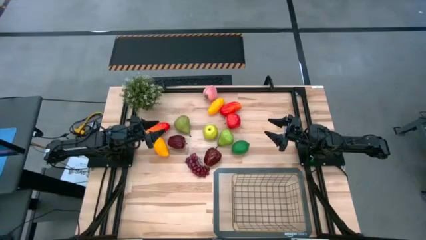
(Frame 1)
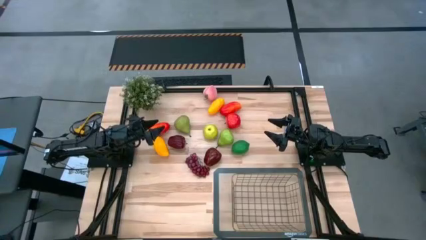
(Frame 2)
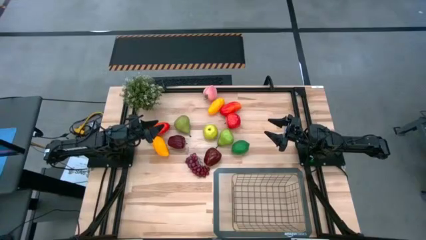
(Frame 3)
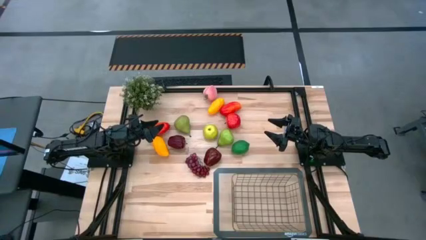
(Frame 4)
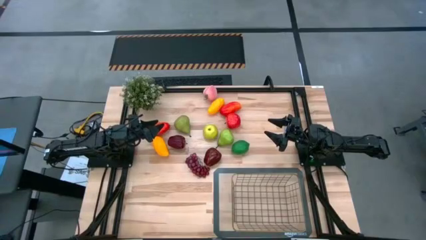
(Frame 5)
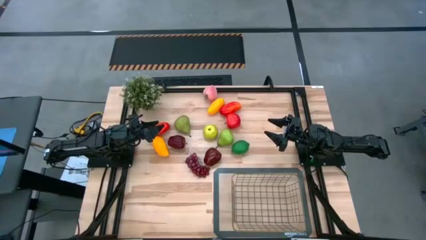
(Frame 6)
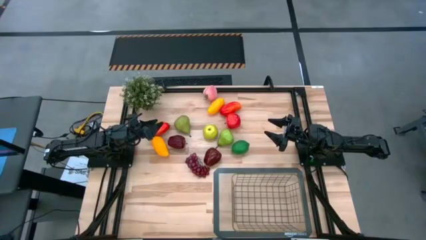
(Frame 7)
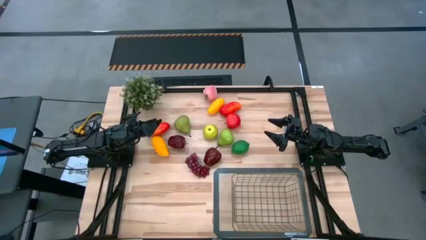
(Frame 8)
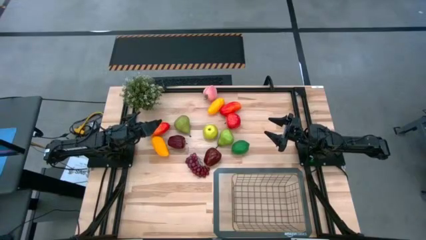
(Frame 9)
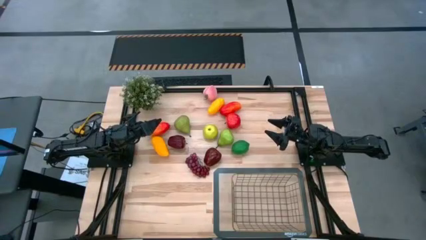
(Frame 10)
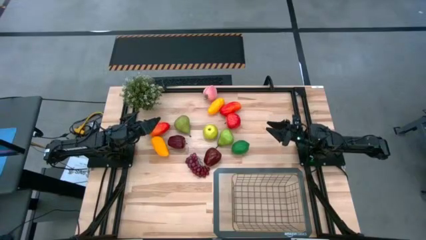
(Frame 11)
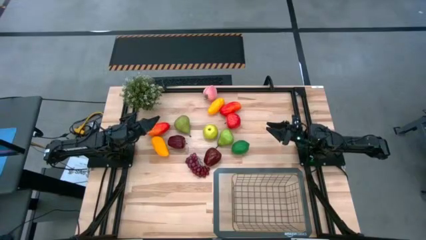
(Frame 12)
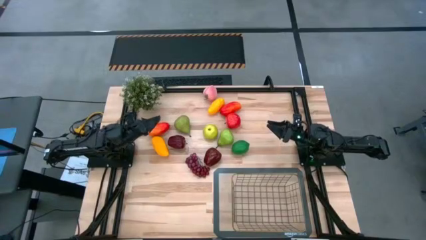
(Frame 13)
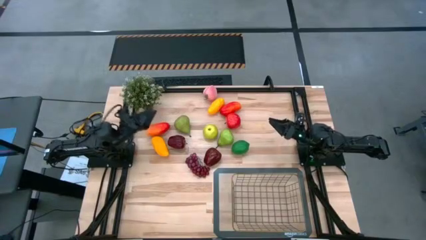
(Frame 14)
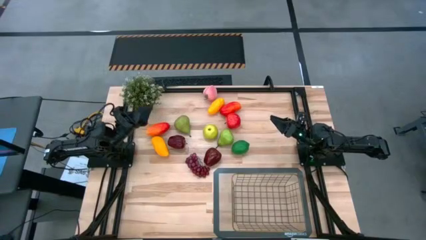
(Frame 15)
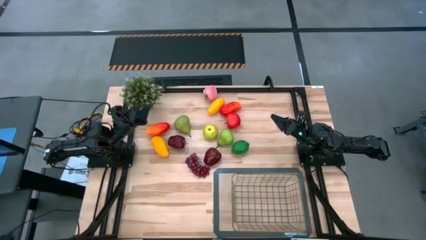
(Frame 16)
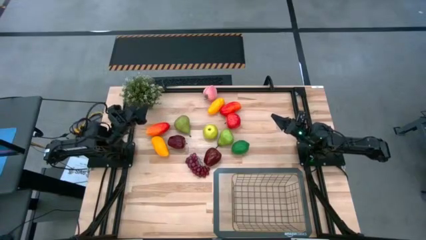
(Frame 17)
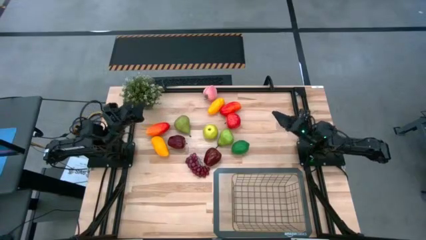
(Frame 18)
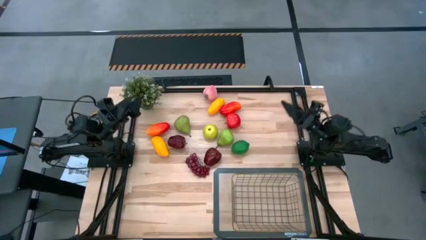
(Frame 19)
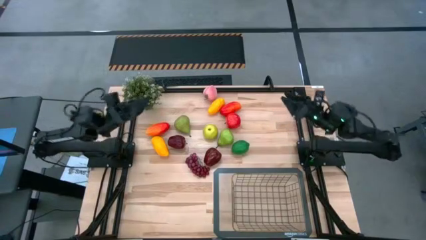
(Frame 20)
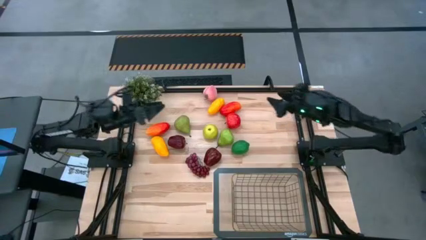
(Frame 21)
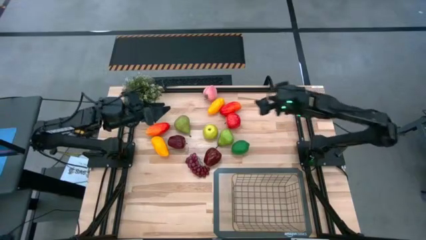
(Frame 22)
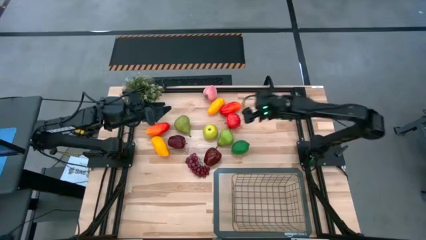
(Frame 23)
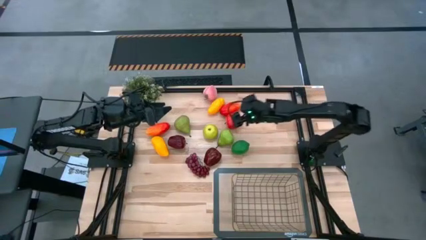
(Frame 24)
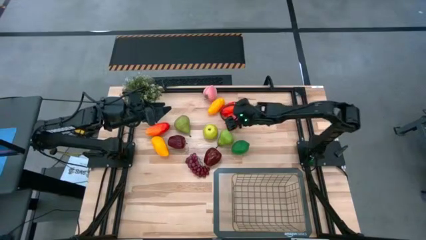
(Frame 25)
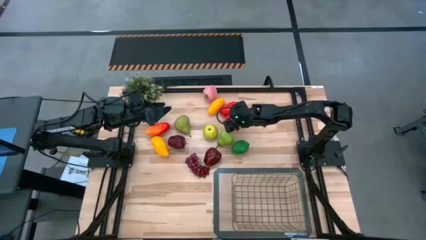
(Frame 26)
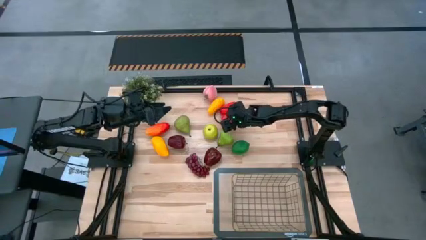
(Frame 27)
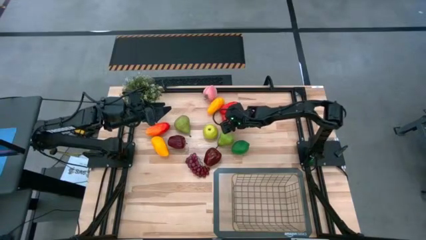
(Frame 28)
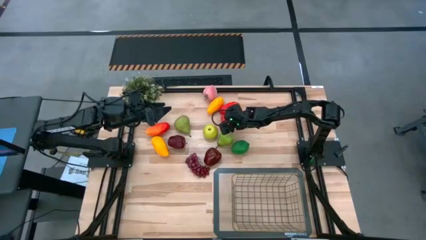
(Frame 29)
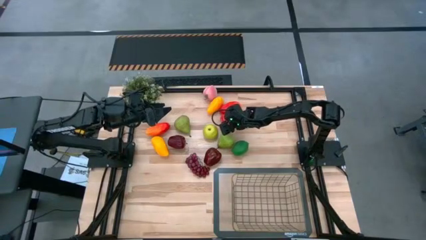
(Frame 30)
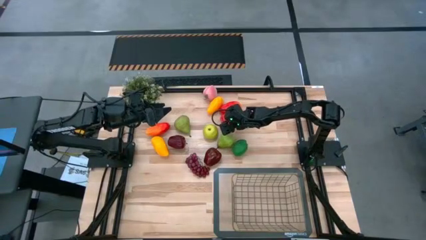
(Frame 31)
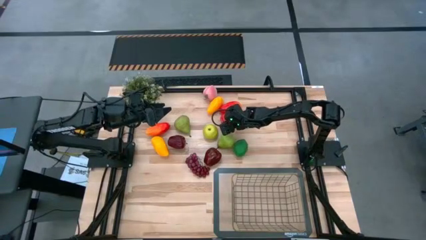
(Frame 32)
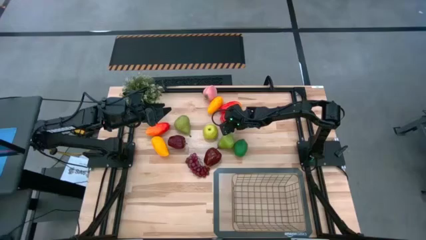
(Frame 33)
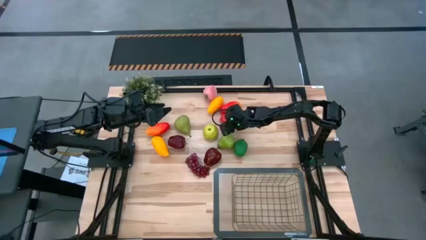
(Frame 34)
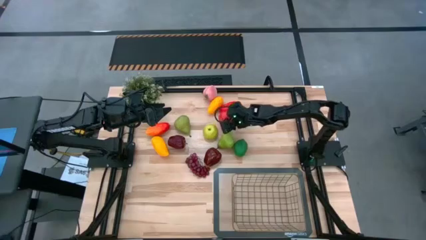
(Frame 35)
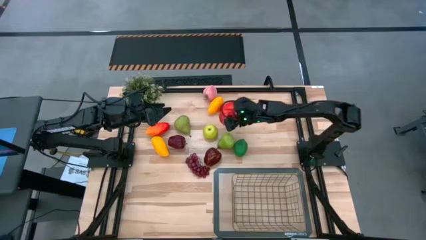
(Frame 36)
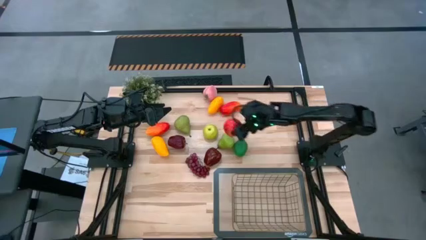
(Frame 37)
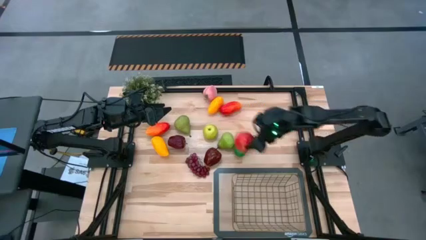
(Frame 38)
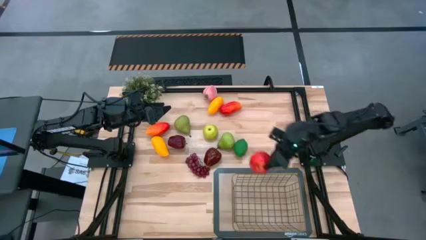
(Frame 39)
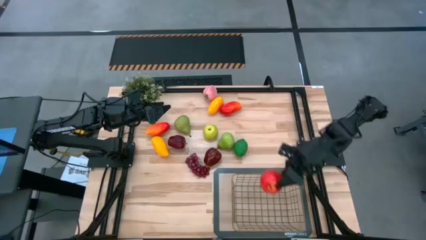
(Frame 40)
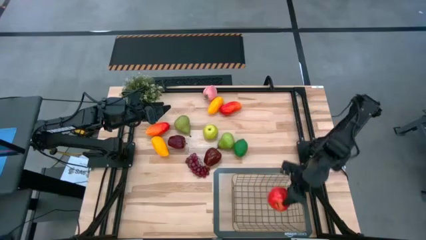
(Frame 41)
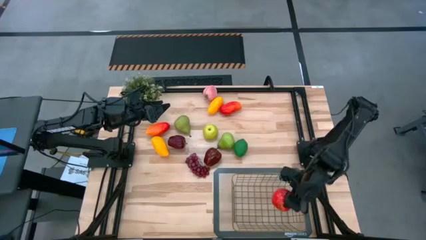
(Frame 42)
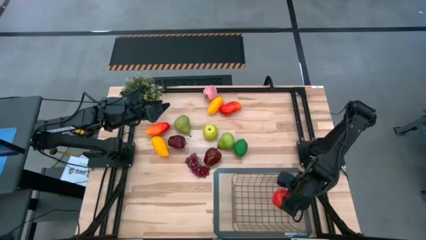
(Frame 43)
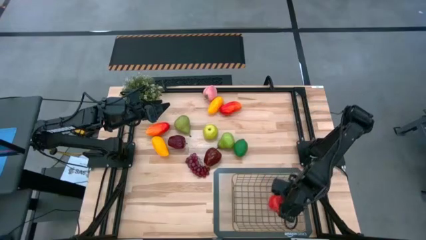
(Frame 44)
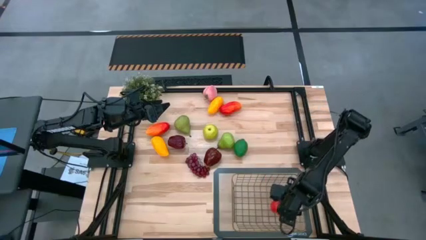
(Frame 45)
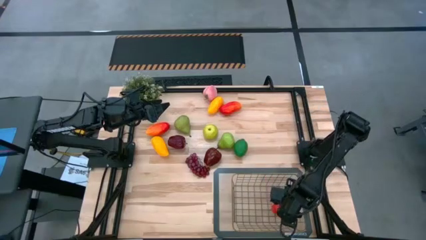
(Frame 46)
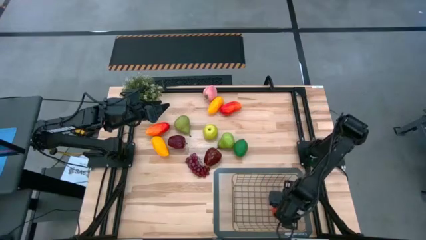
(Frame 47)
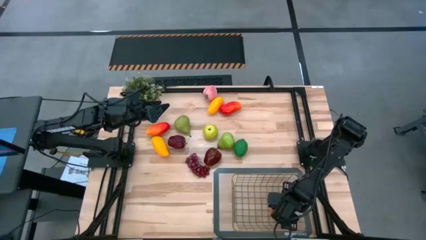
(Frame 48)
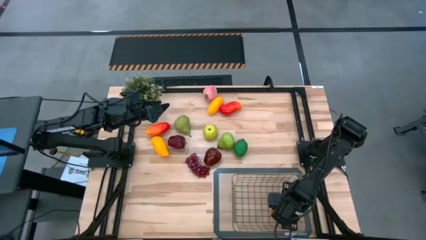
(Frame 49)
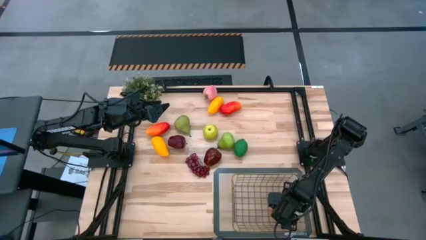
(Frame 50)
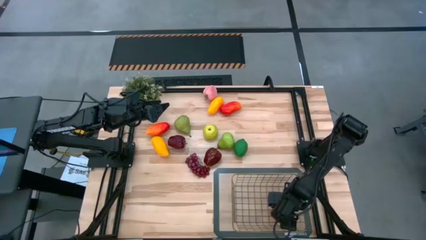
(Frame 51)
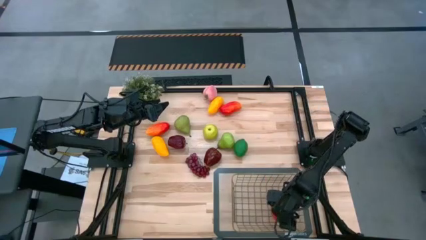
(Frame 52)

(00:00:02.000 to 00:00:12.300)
Task: Build produce basket
Put the red apple into the wire basket

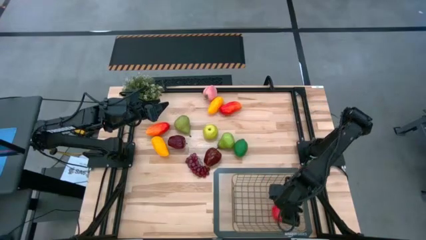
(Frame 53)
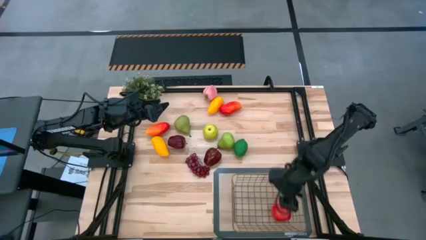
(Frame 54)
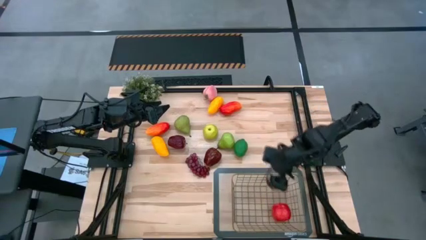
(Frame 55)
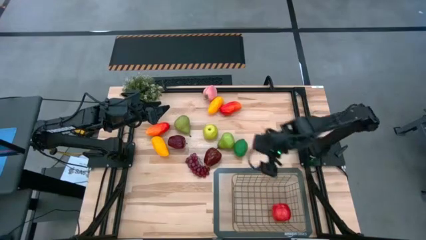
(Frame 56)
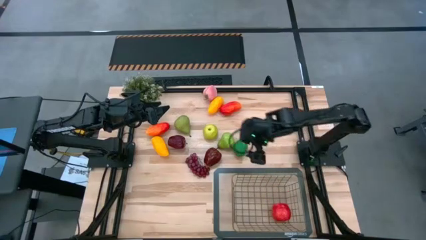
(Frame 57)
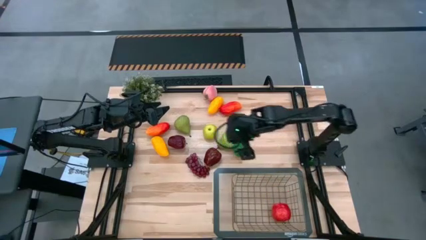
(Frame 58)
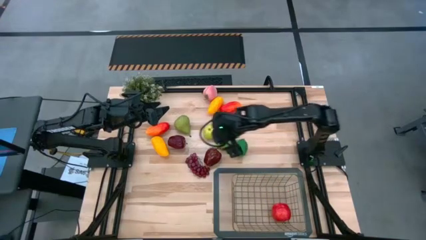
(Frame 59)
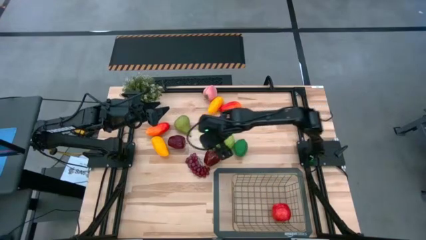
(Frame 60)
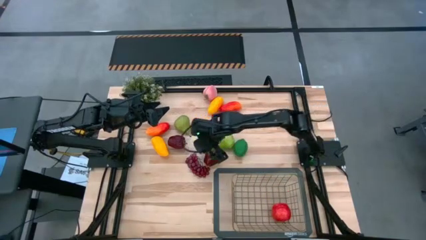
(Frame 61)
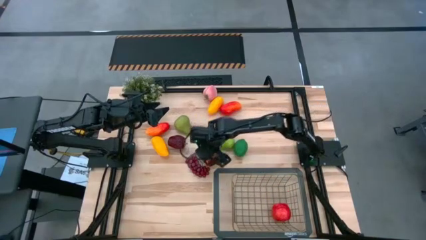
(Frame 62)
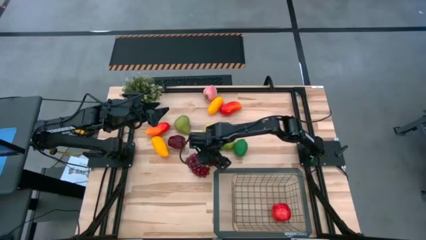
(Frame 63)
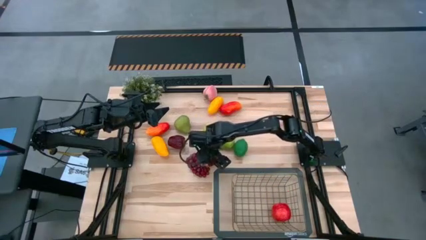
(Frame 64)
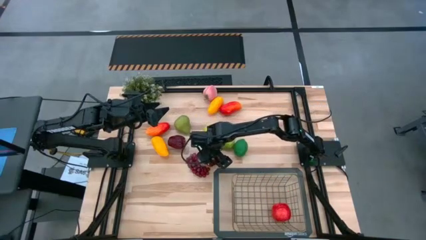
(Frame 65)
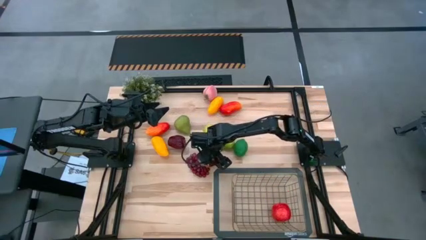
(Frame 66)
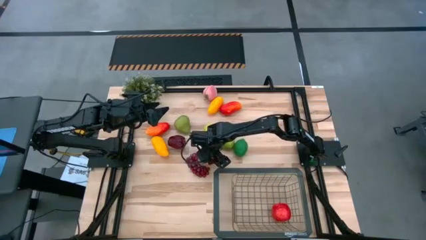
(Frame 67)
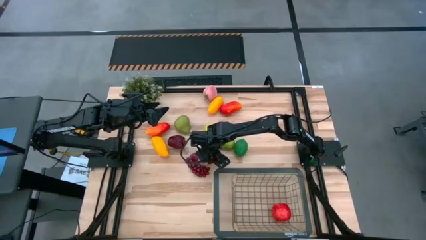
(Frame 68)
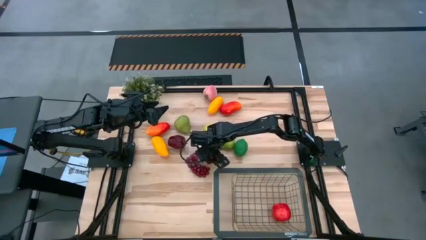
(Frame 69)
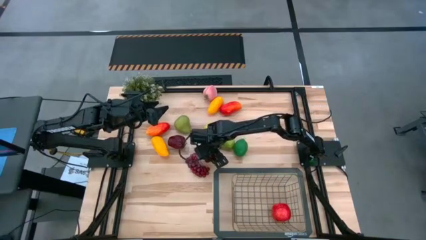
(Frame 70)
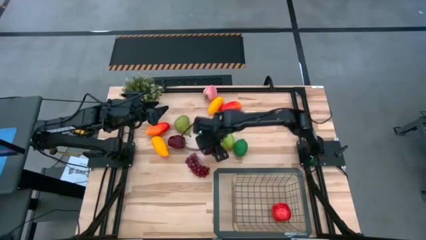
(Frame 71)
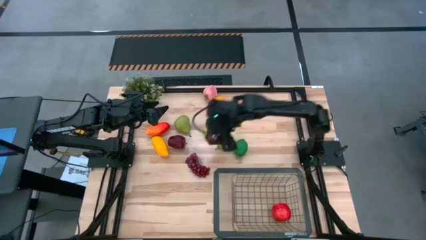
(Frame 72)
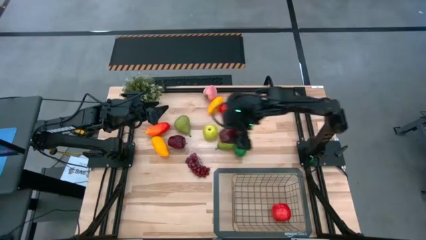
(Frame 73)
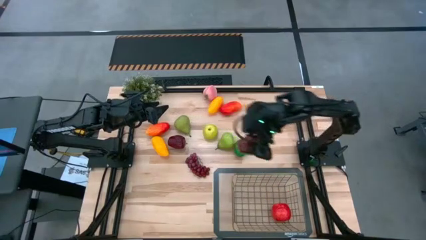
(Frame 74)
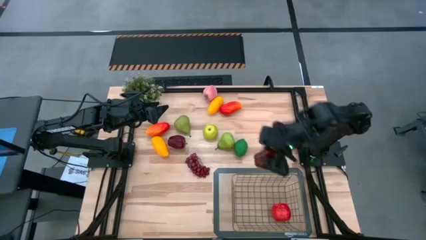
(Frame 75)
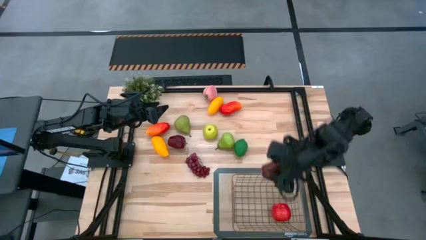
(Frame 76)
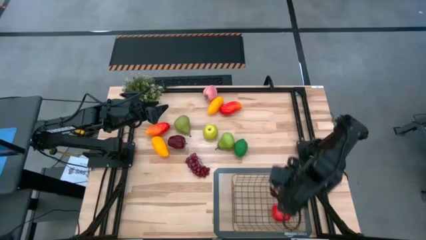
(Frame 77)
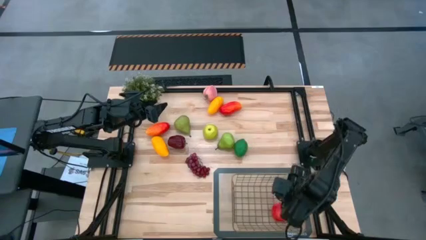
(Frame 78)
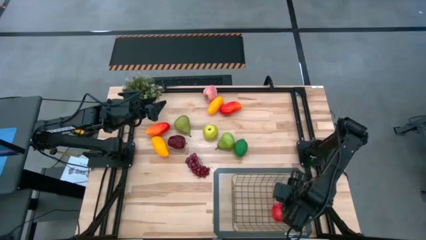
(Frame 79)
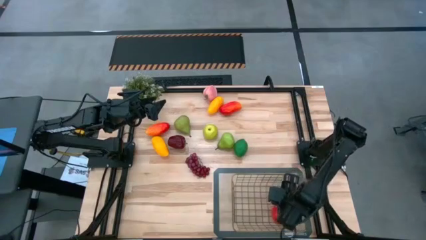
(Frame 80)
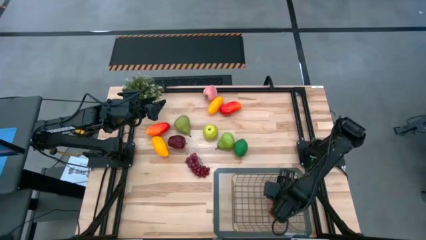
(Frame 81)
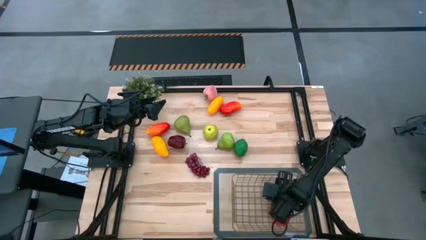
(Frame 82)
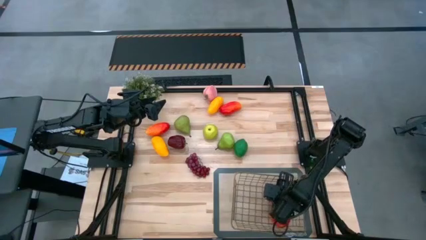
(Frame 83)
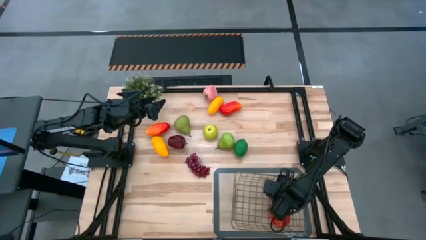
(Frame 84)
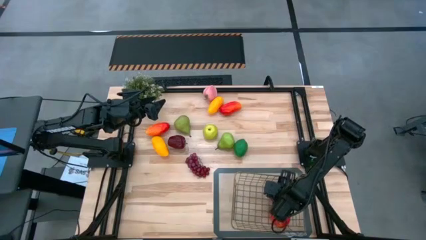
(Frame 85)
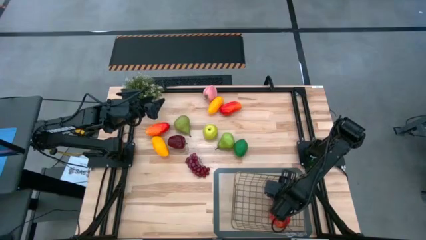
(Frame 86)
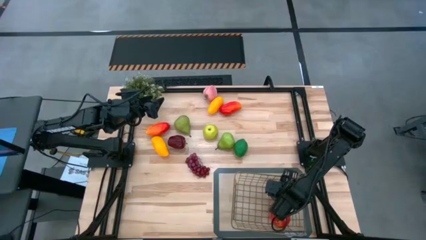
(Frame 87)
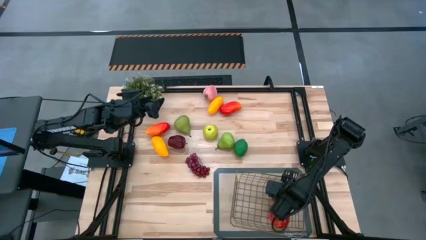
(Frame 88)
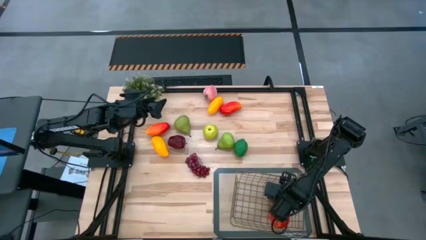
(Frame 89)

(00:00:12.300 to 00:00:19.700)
Put the right dark red apple into the wire basket
